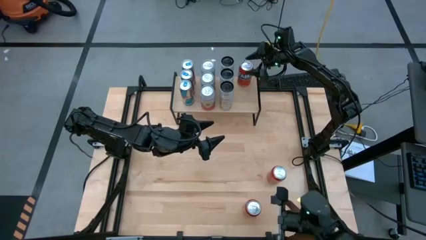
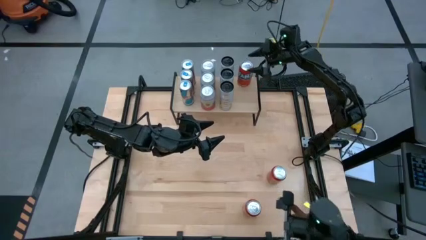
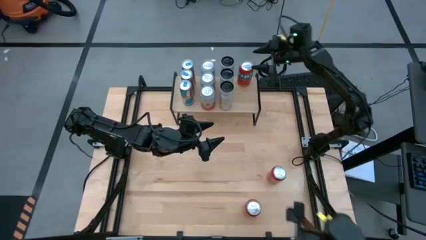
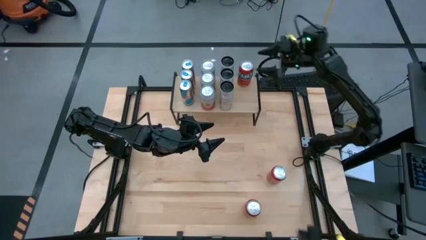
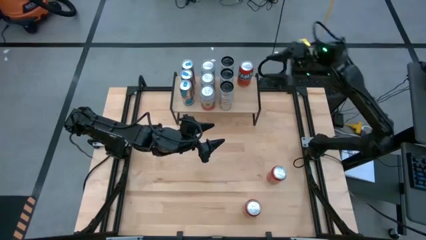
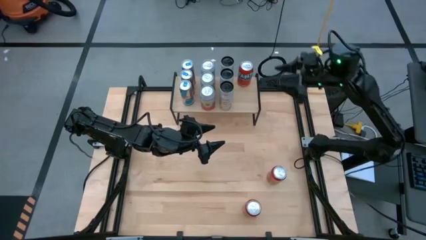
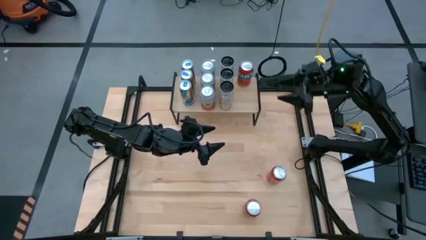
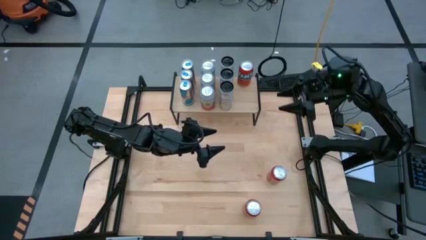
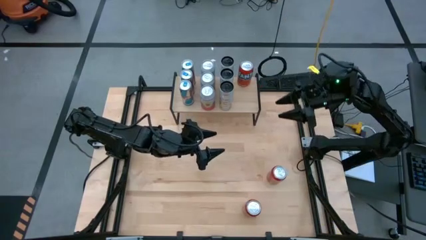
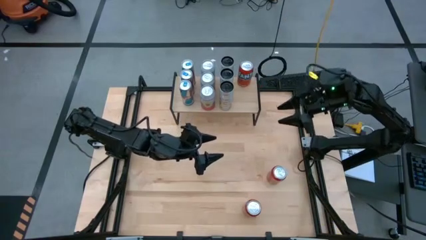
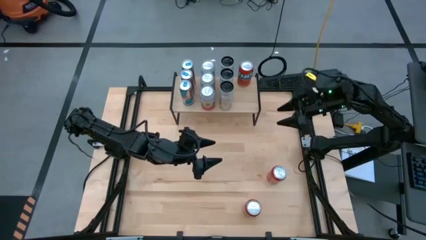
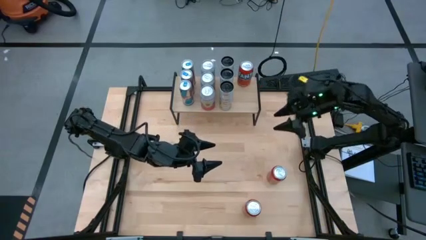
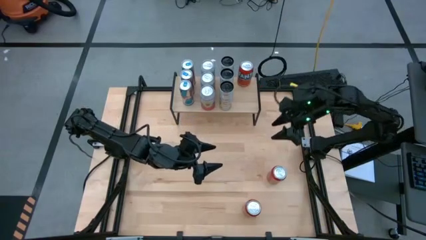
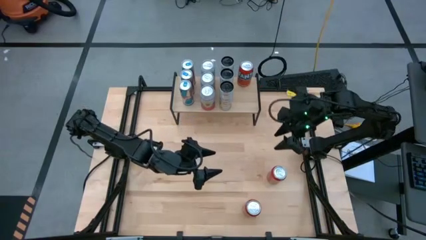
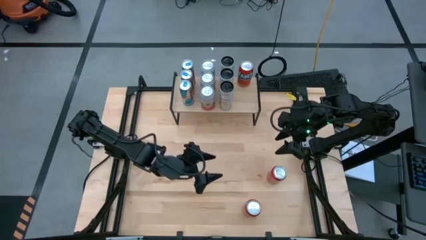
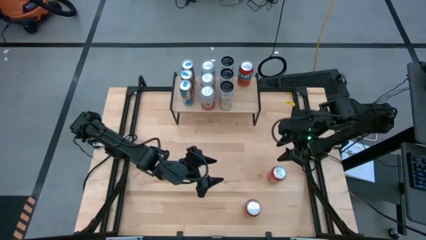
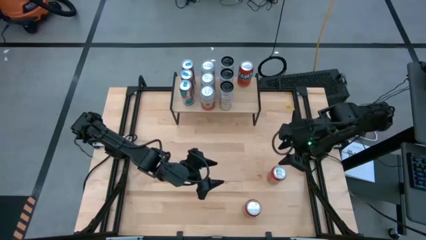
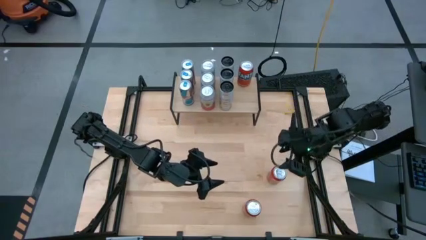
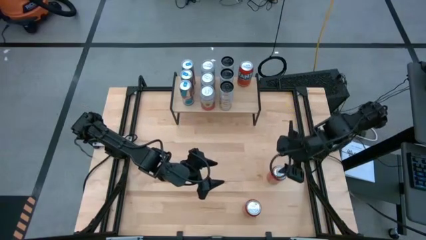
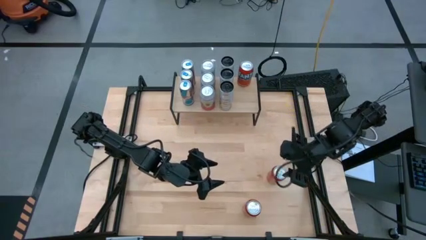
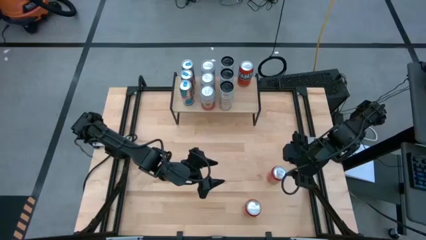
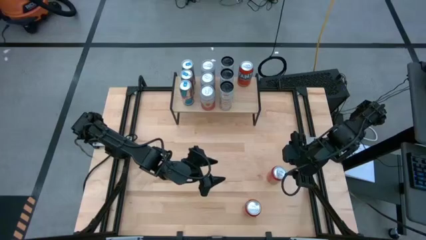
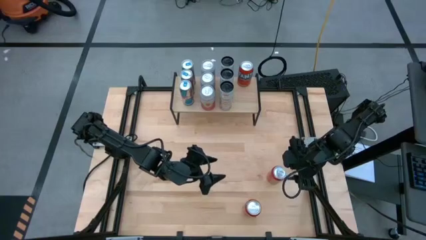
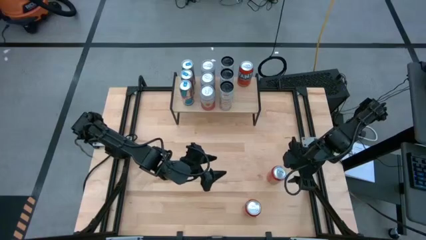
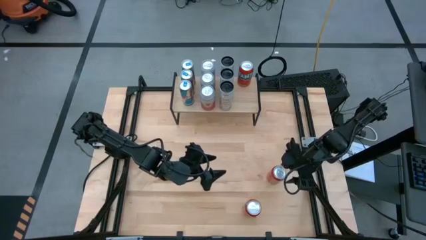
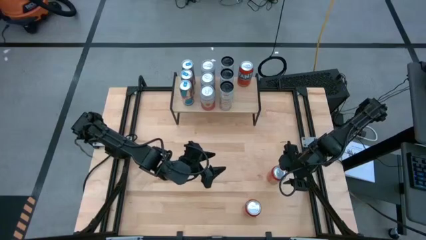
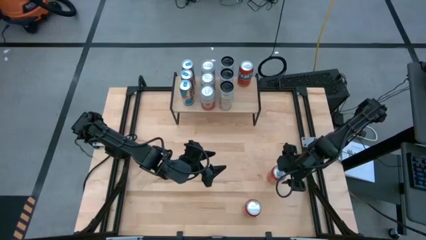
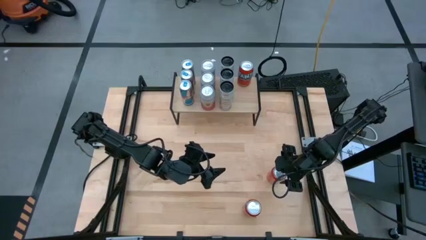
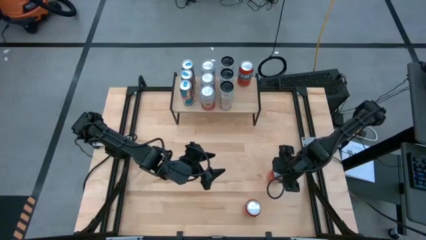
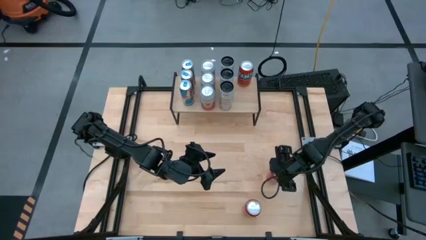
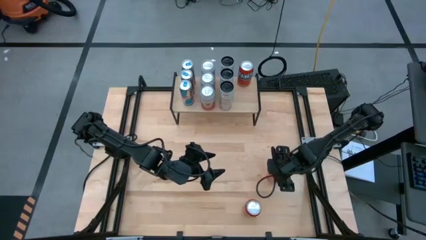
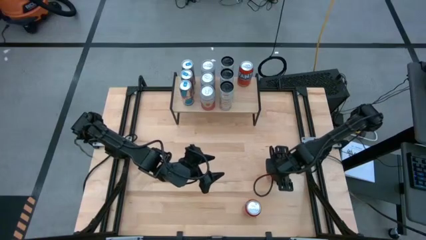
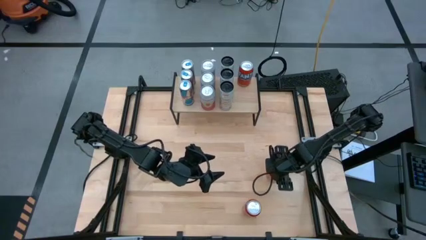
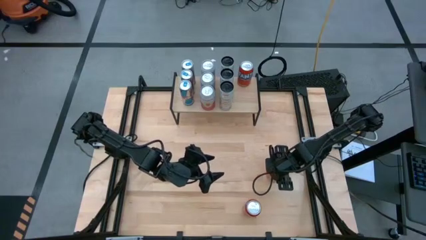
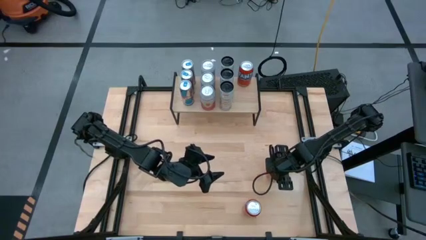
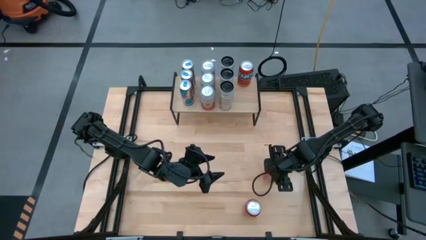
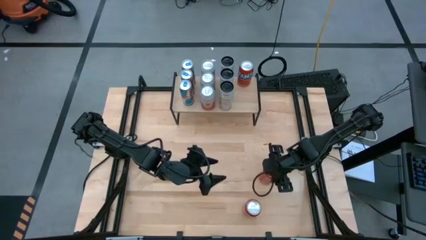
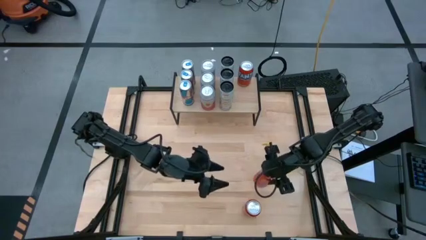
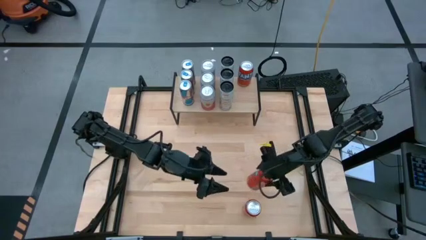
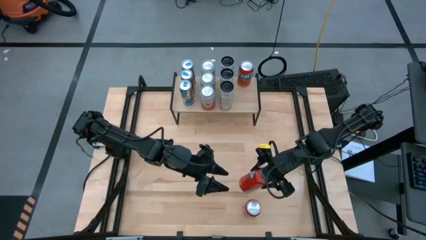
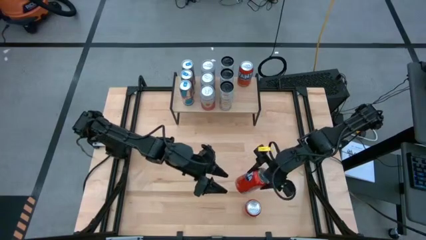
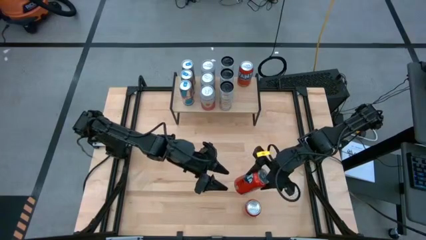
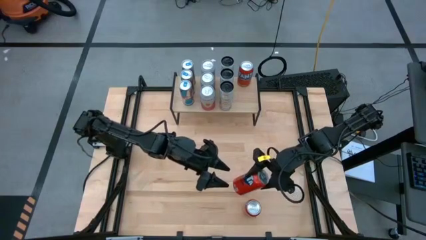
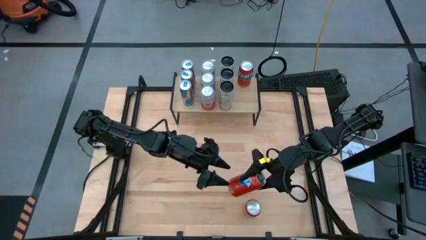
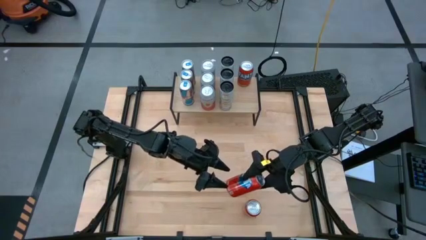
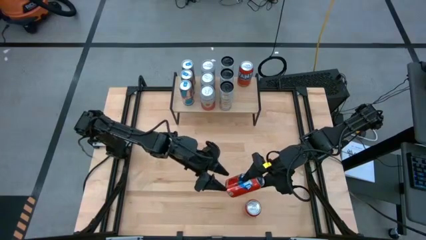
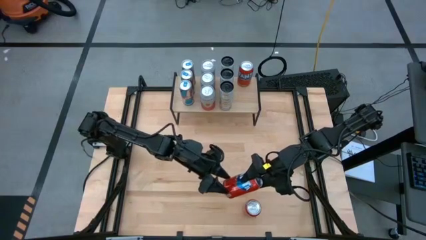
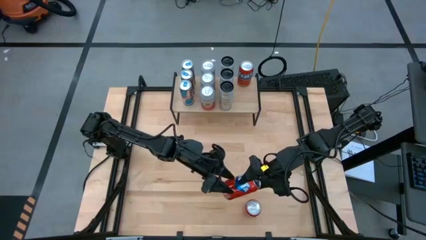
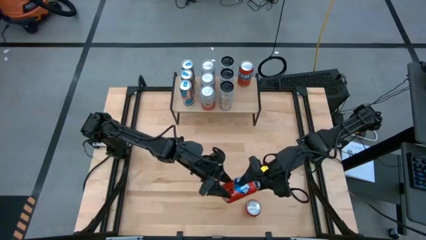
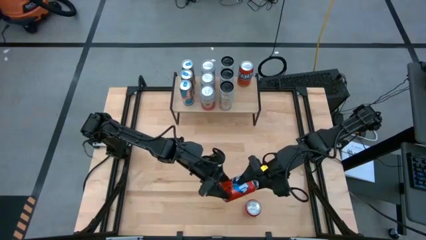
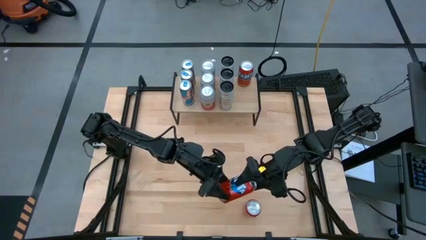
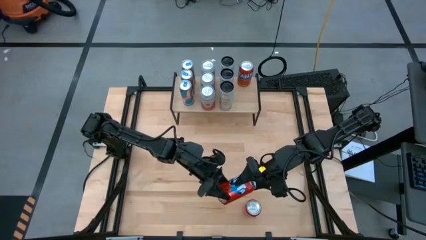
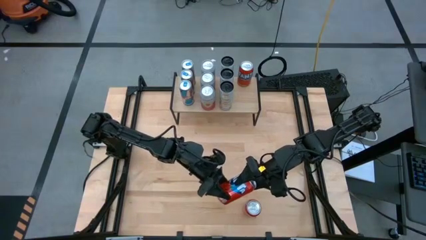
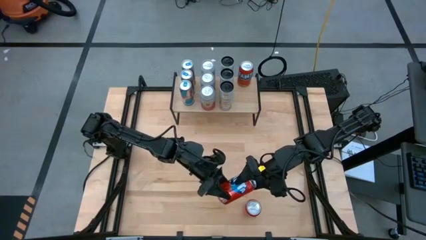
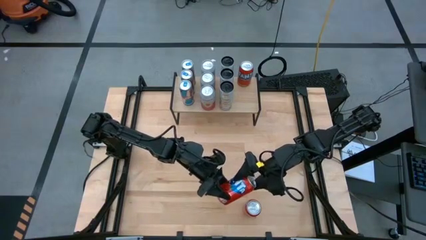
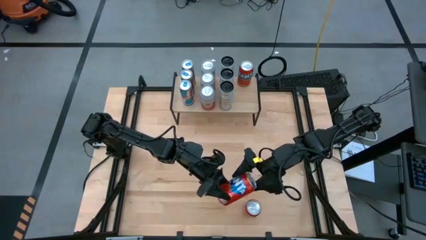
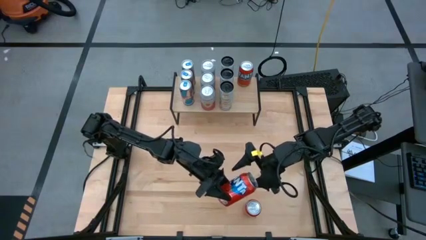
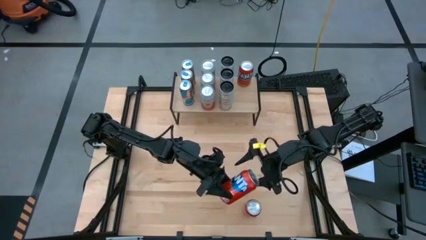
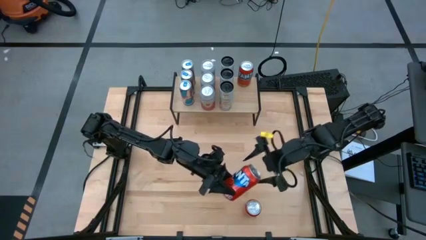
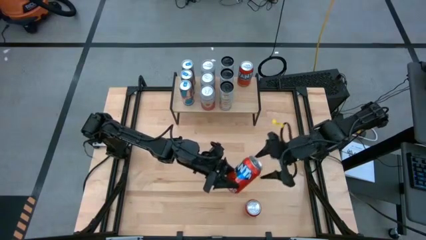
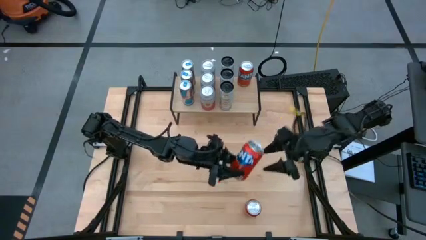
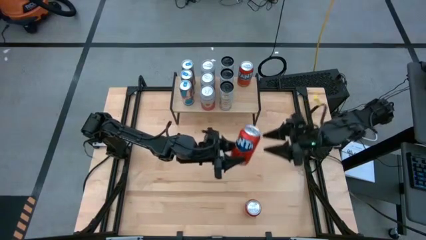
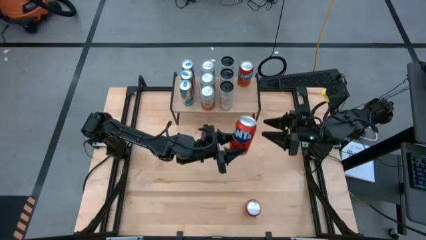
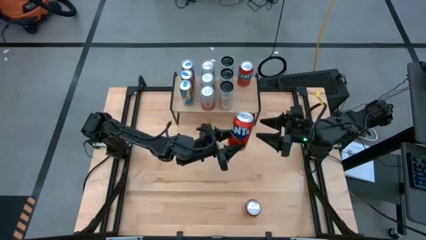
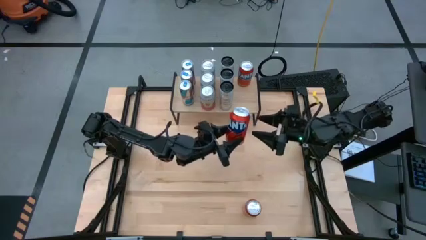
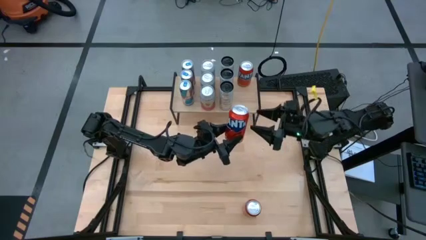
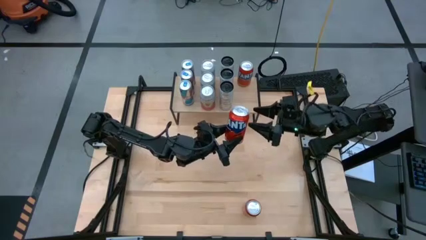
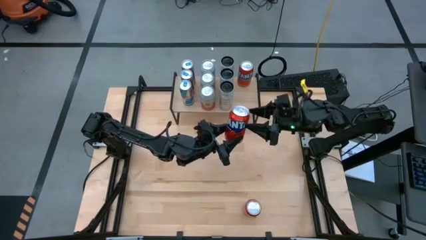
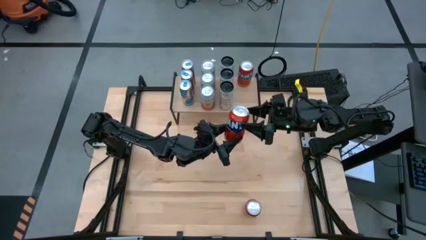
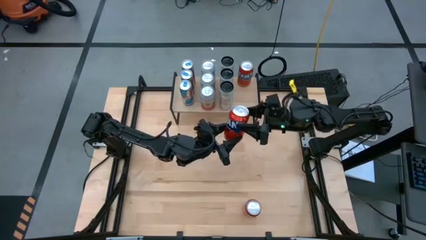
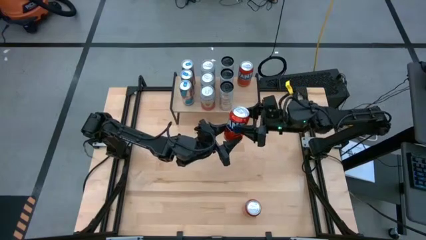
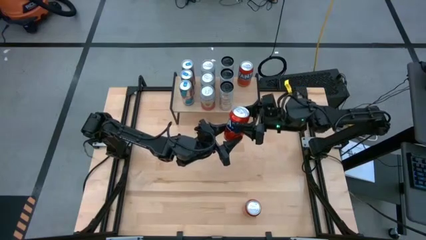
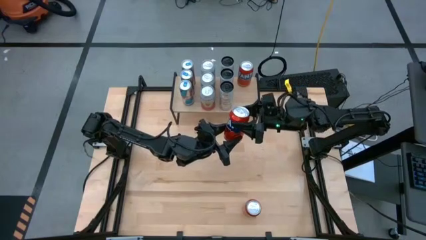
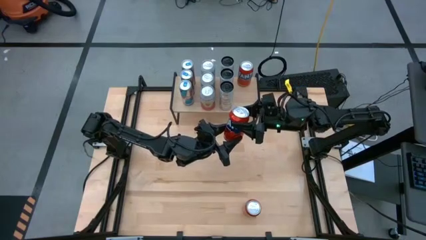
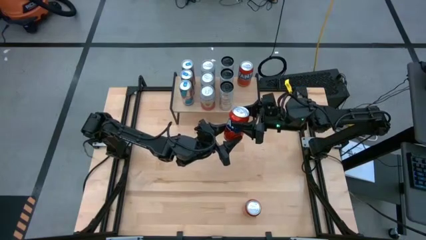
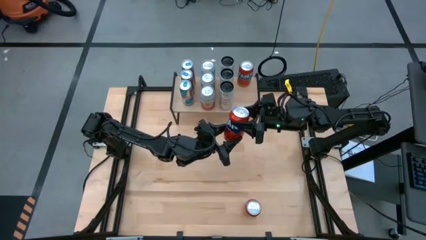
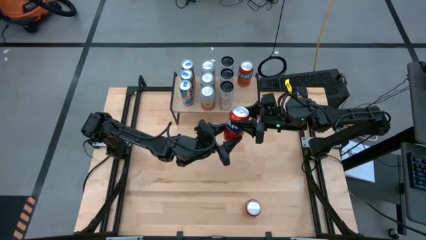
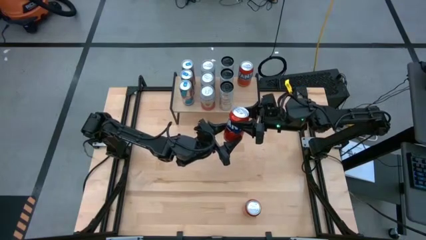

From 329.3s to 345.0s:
Task: Place canned beverage on shelf
Put the top red soda can aligned with the other red soda can on the shelf
